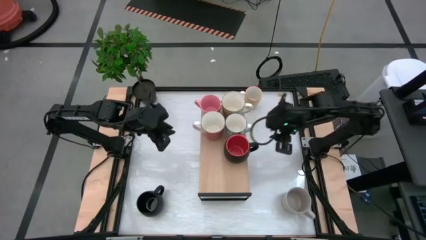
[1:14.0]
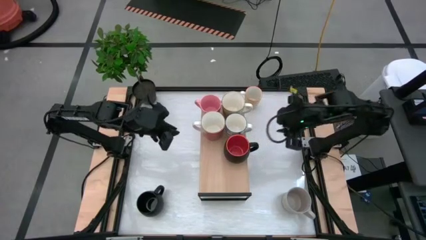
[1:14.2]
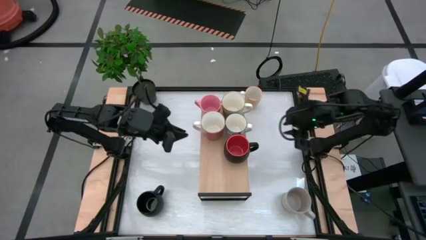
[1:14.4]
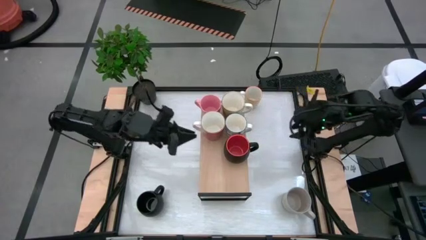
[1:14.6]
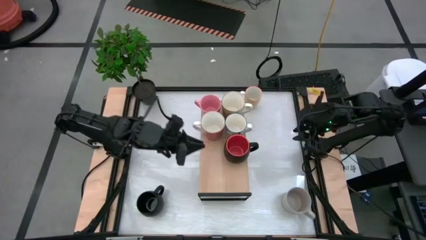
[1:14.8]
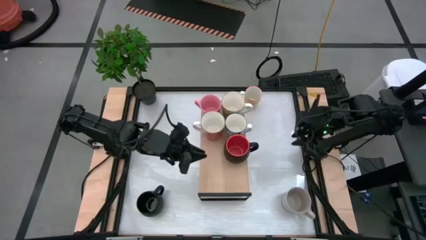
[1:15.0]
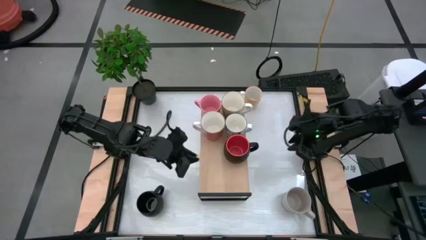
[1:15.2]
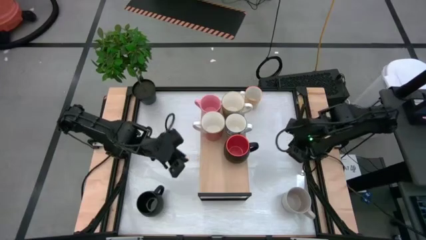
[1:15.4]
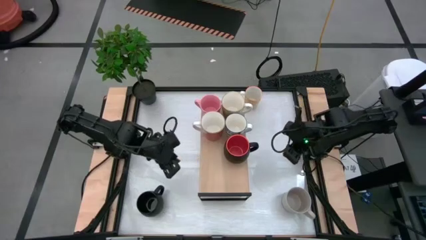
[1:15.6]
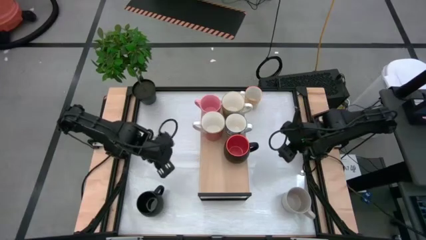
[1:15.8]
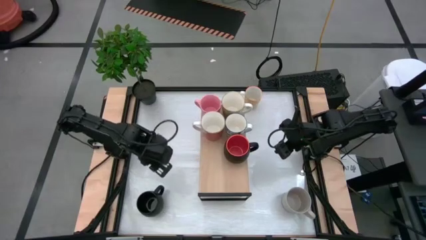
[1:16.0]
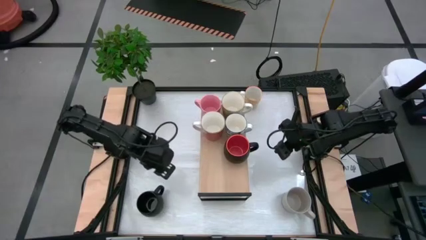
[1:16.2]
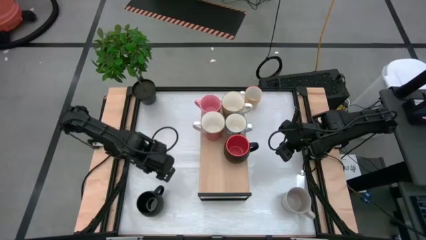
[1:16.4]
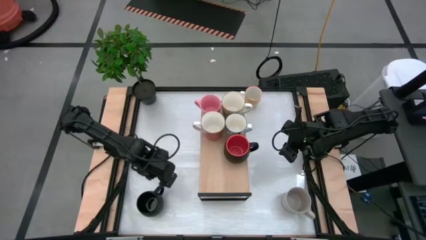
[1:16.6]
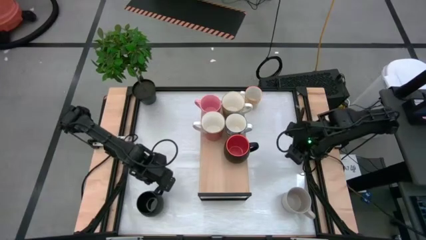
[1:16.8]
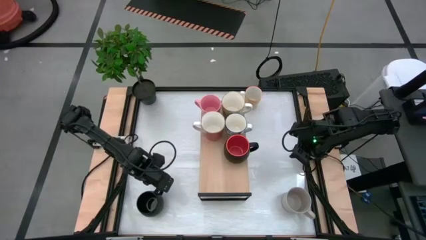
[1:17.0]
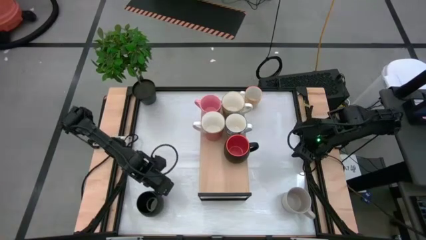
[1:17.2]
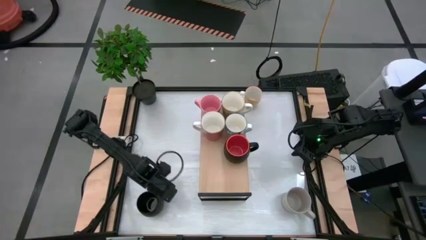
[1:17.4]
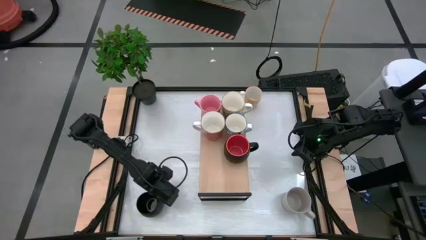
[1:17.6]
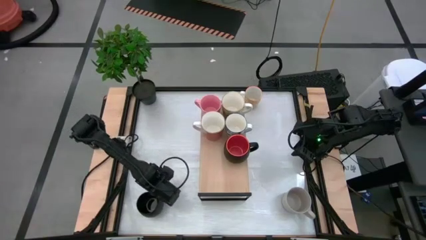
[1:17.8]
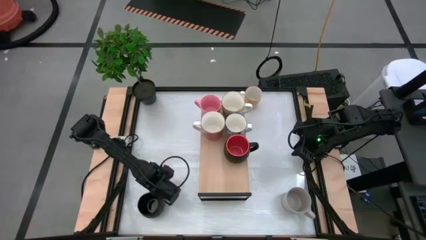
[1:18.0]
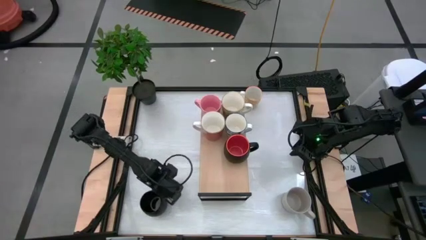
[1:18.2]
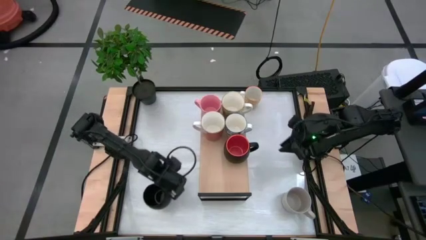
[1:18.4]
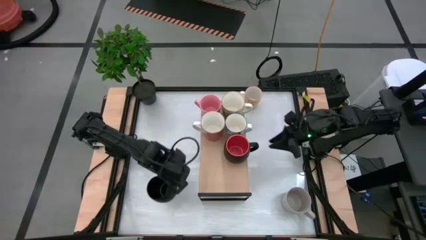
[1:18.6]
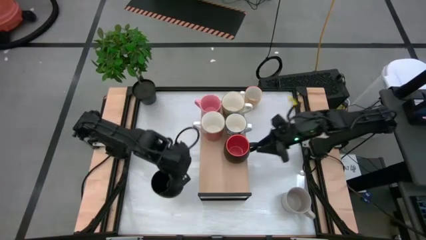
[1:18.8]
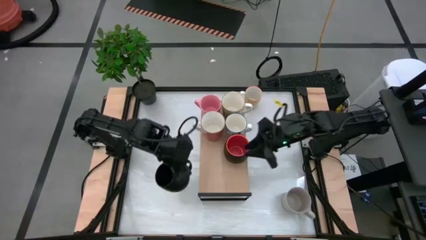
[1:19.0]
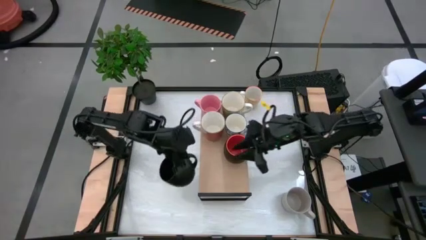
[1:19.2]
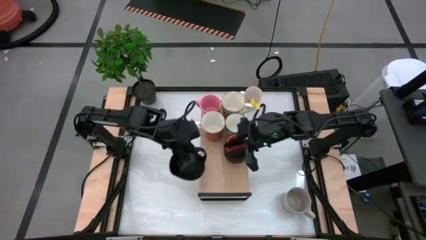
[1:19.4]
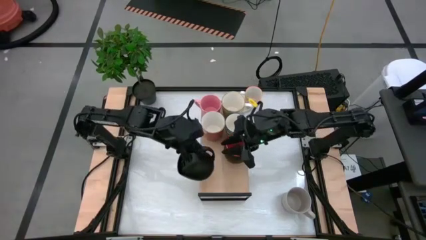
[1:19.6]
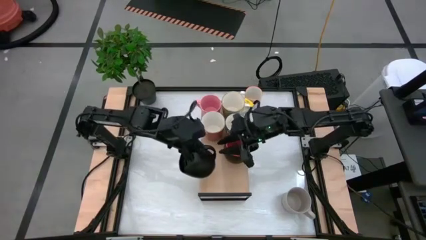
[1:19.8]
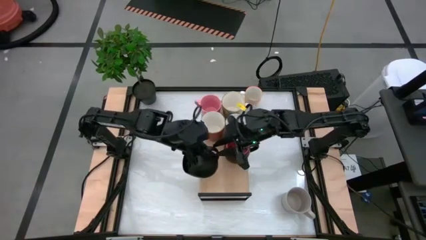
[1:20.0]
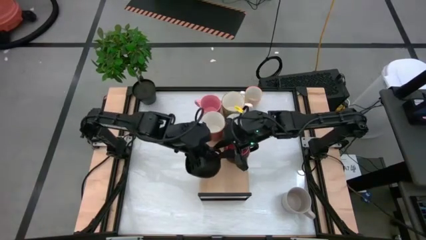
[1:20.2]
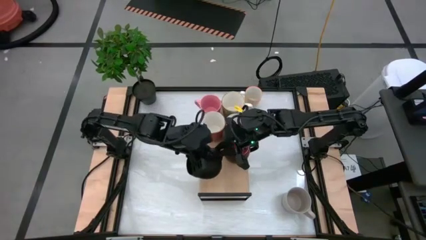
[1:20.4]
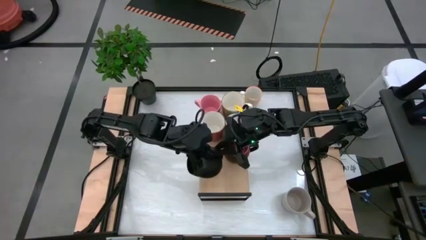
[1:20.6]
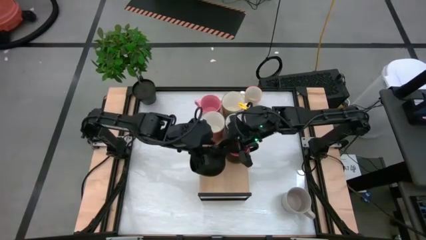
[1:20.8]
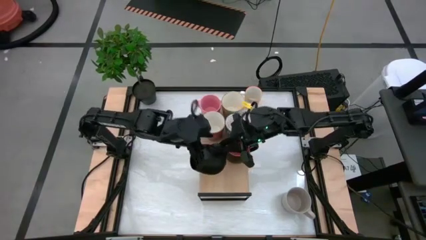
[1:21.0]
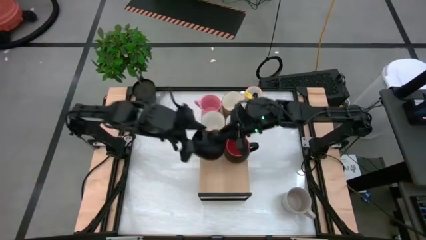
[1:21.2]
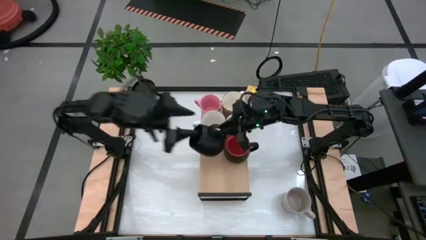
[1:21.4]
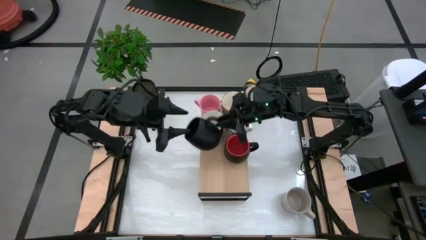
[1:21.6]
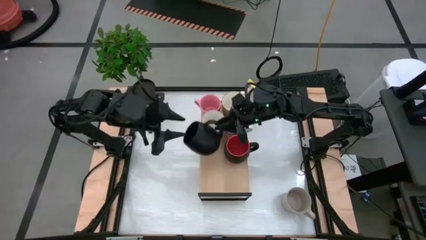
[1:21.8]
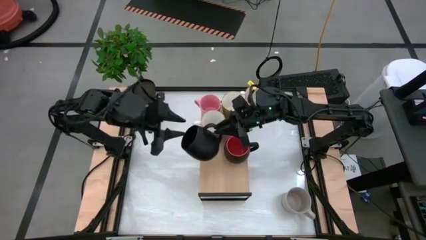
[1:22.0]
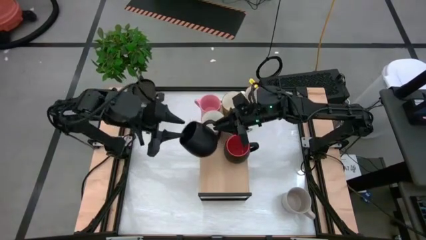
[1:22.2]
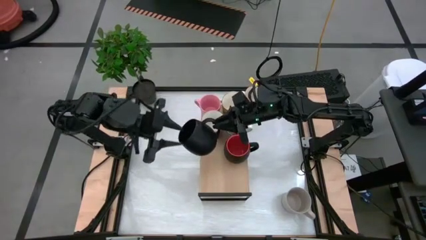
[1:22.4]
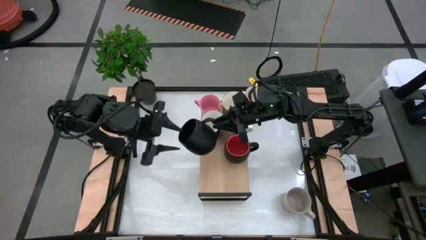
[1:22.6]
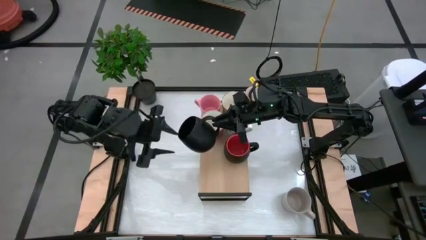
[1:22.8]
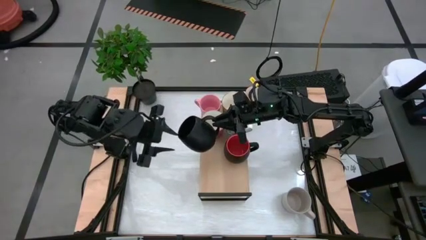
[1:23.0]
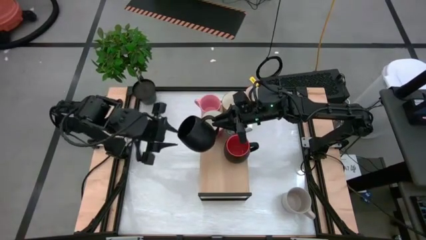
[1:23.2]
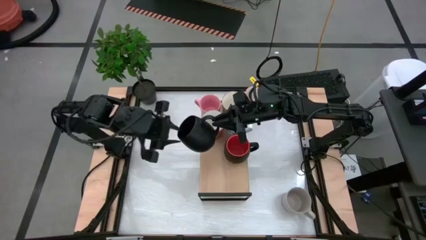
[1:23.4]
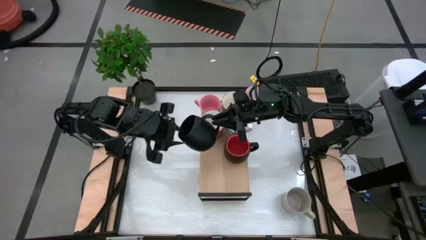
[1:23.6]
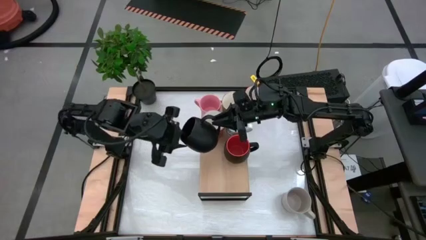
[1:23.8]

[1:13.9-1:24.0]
Task: Place coffee mugs
Put the black mug on the shelf
